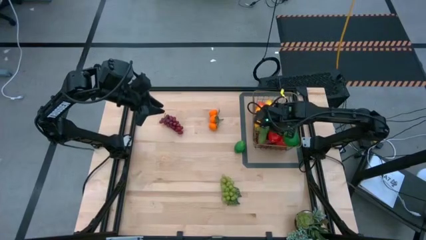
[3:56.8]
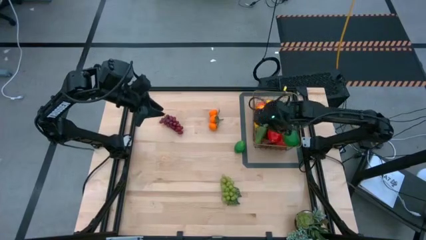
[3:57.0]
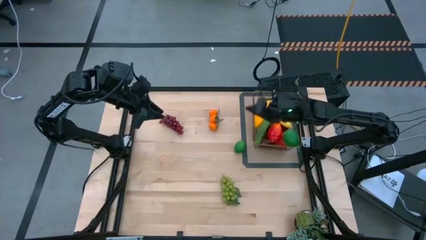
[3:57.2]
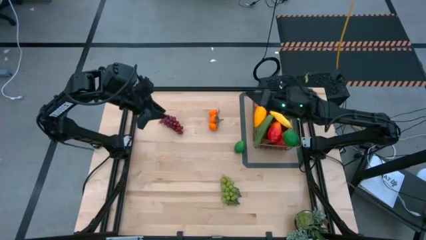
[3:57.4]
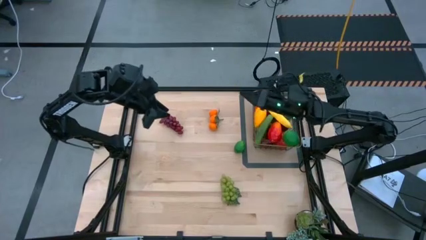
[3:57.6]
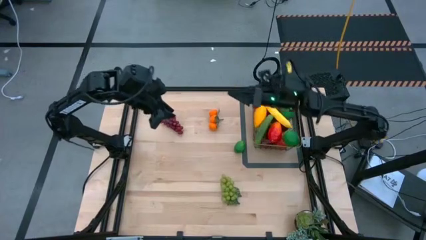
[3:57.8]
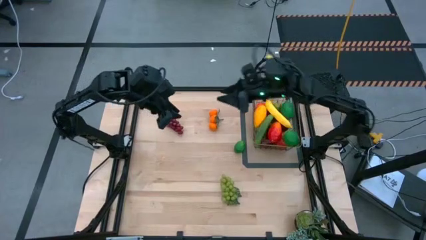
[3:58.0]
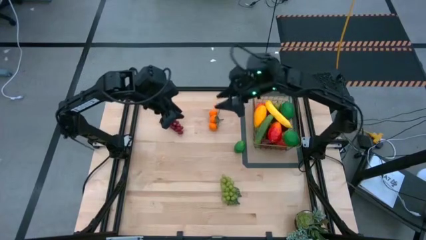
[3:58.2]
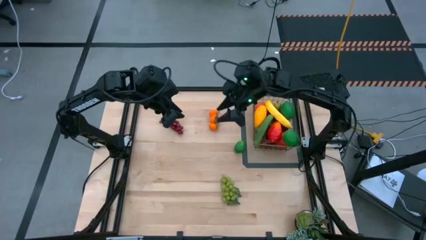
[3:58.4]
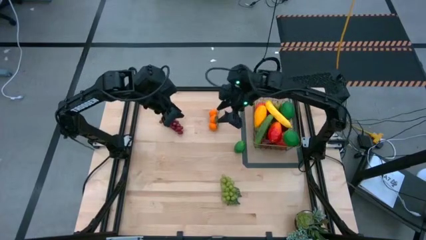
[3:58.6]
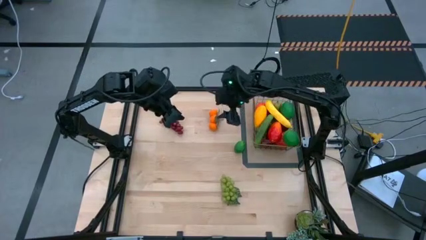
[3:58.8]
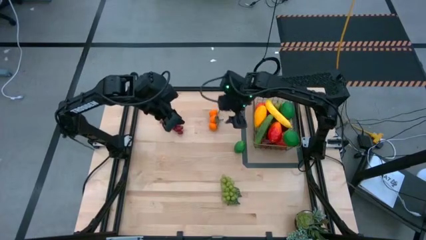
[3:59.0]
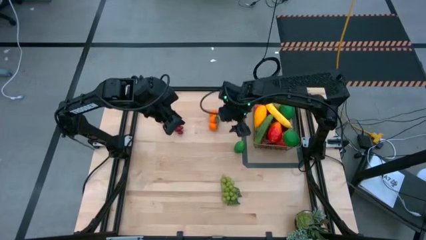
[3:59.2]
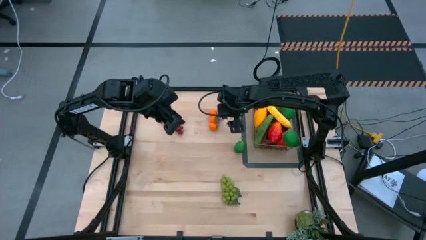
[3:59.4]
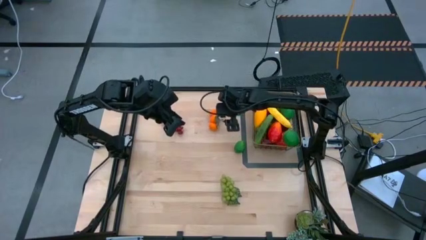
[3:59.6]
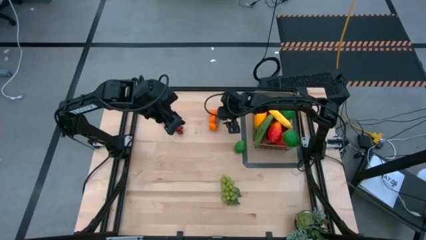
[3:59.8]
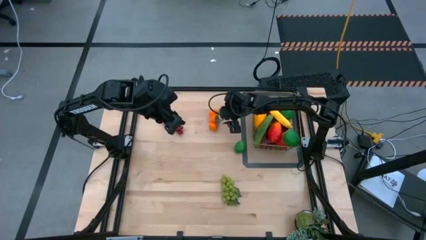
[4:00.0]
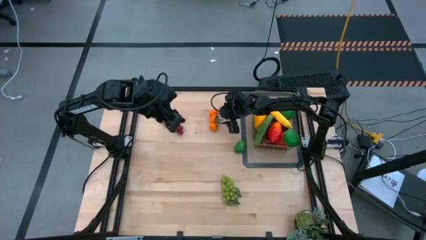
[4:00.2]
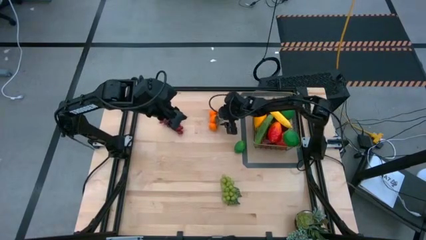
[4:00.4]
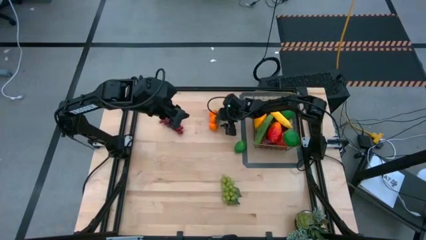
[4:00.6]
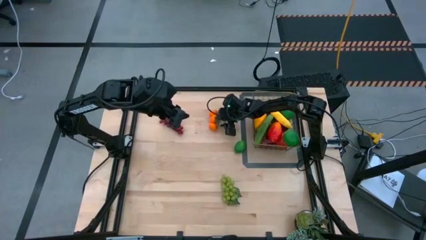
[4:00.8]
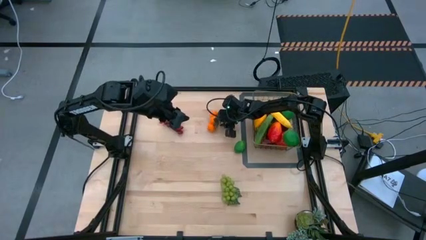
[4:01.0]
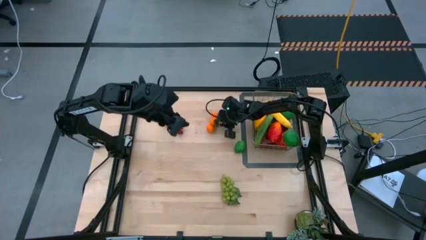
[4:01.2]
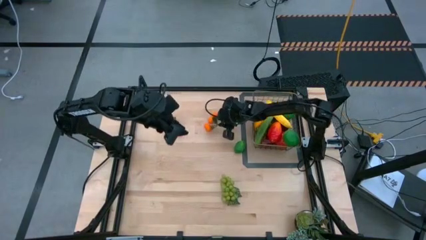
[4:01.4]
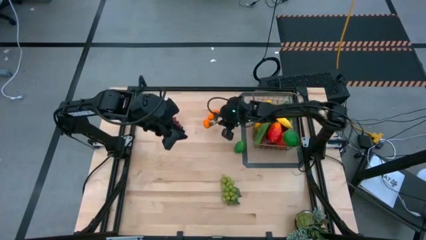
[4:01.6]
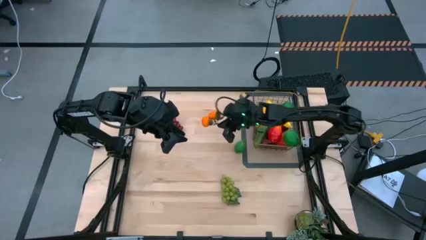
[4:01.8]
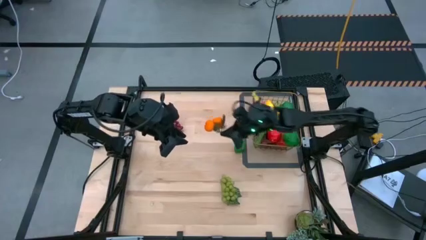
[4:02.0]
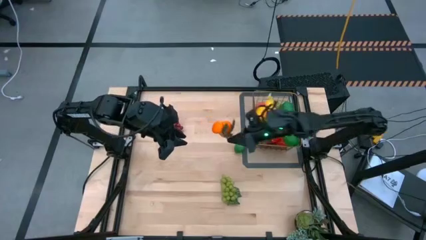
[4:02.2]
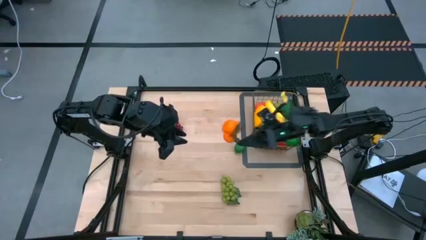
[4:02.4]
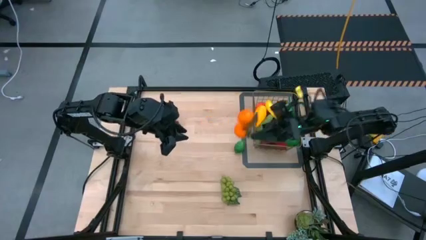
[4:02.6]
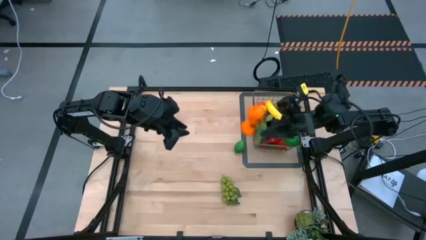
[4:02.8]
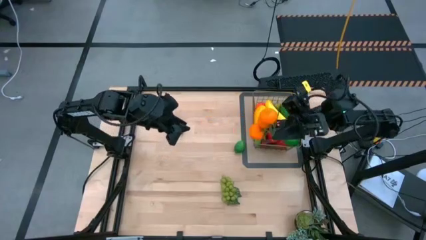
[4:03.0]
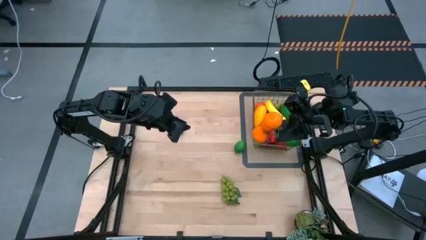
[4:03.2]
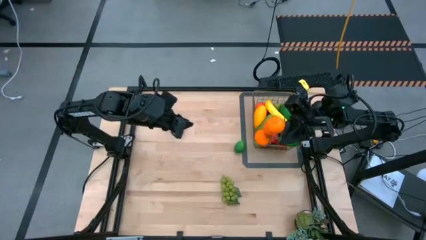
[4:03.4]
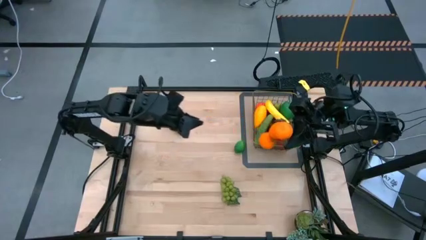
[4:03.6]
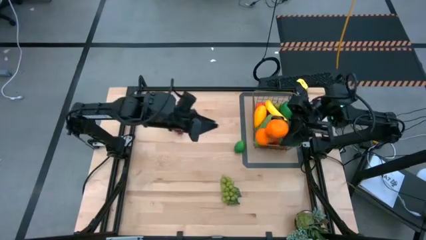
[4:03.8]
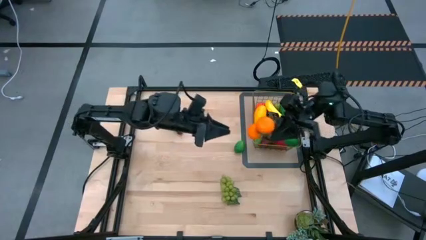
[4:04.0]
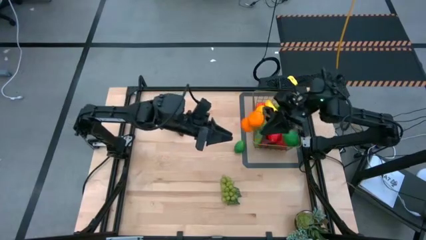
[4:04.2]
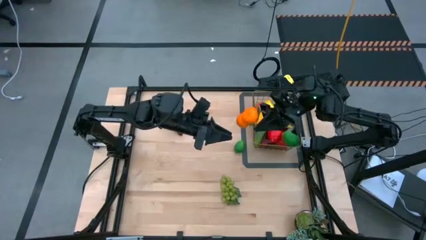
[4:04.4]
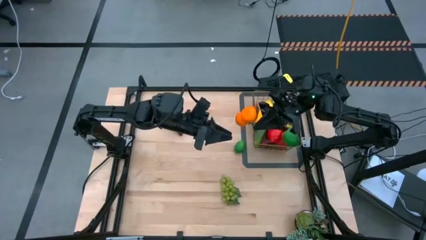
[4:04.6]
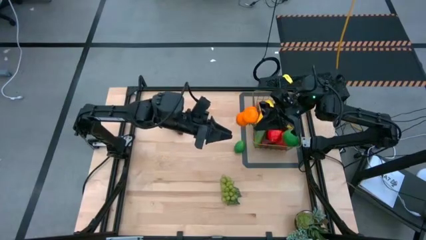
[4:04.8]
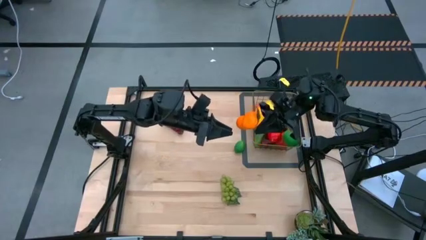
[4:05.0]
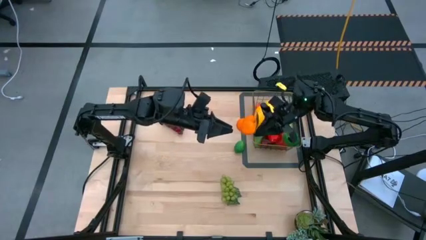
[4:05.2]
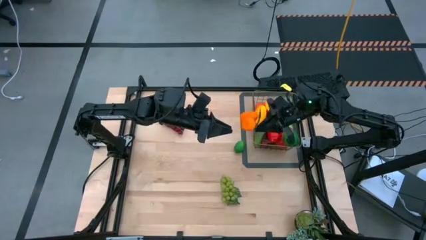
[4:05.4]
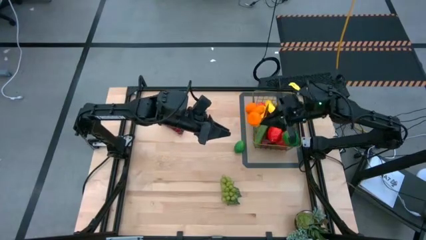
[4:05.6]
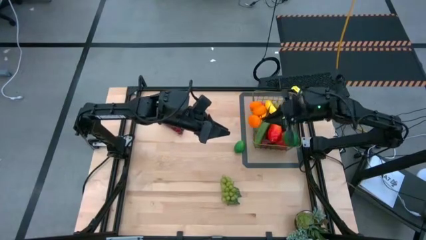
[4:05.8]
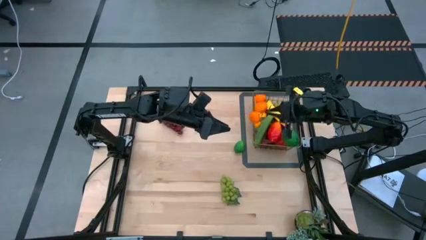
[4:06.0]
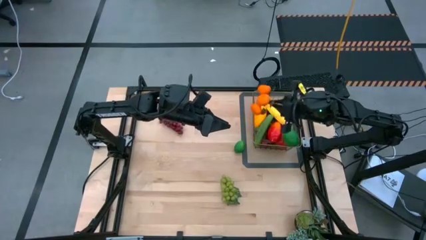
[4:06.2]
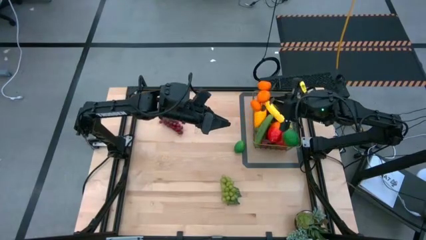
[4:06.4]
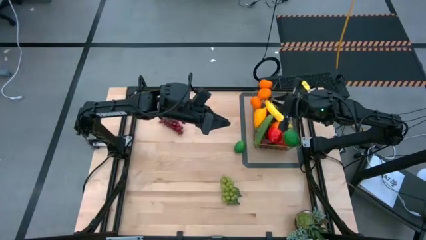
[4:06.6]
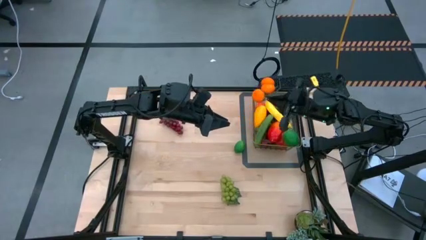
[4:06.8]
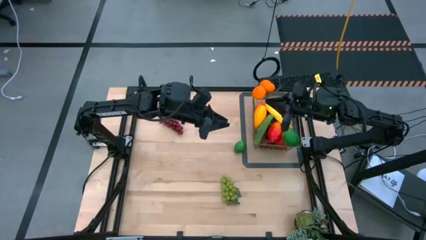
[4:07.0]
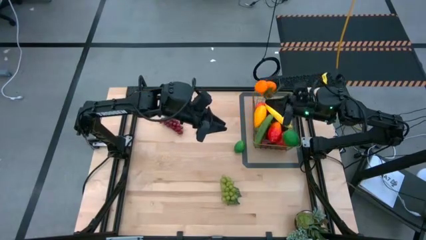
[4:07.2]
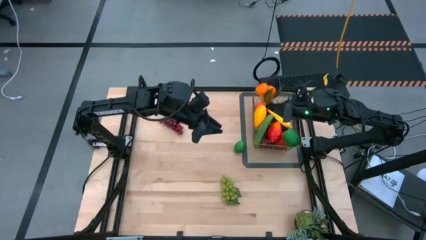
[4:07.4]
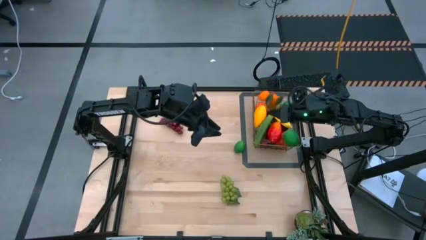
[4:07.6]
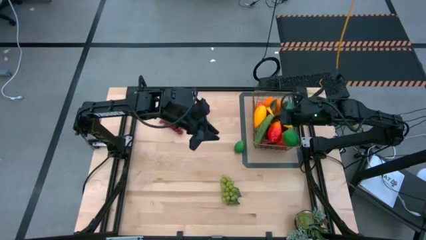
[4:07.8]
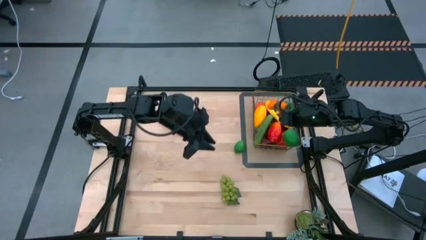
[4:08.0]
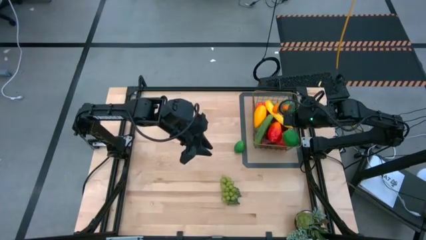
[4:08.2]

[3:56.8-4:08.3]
Task: Build produce basket
Put the tangerine into the wire basket

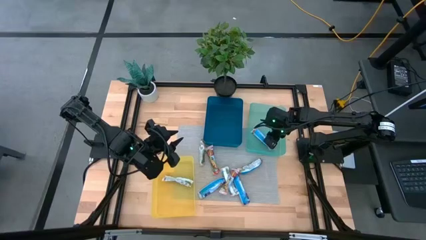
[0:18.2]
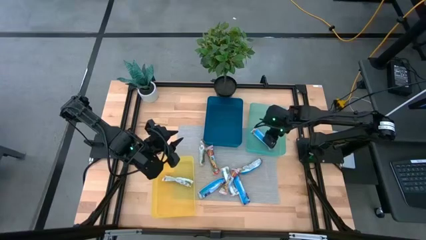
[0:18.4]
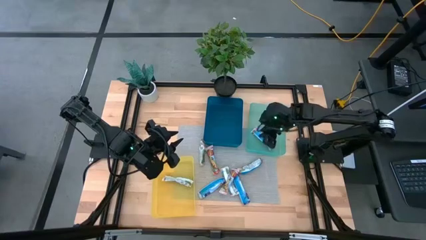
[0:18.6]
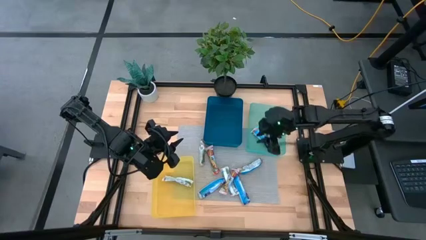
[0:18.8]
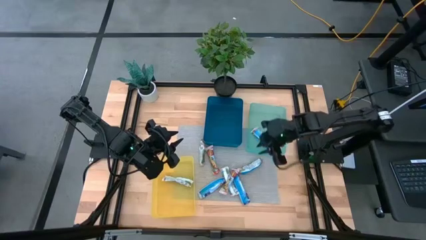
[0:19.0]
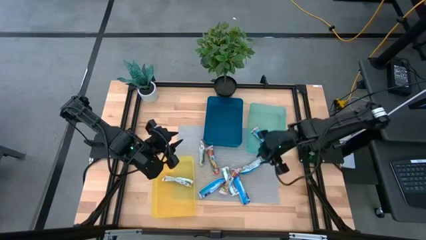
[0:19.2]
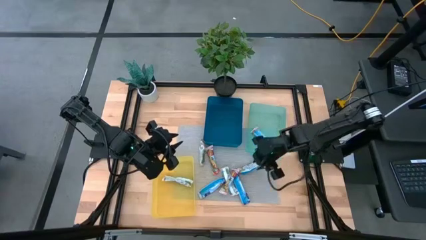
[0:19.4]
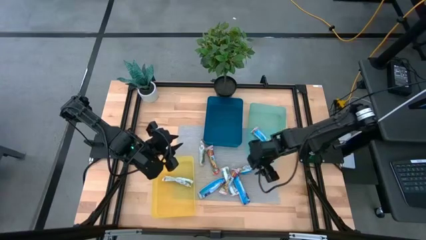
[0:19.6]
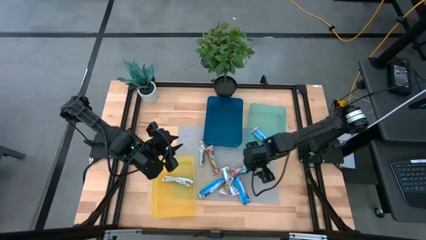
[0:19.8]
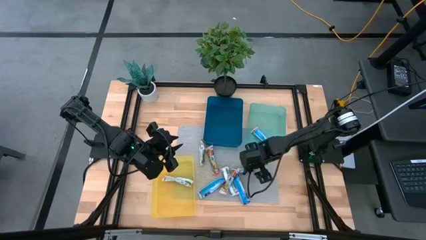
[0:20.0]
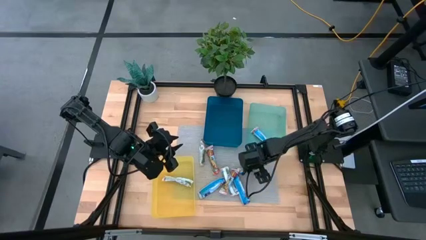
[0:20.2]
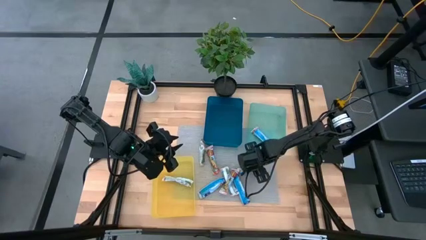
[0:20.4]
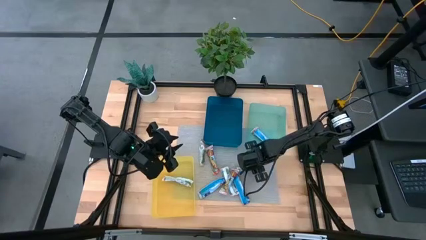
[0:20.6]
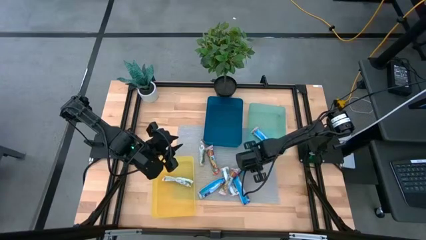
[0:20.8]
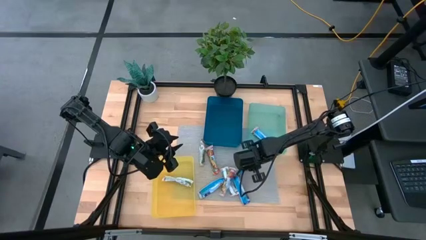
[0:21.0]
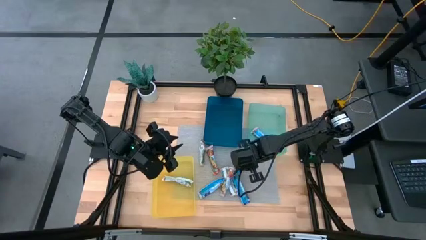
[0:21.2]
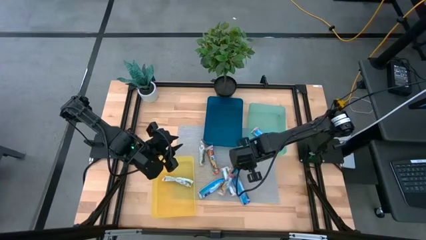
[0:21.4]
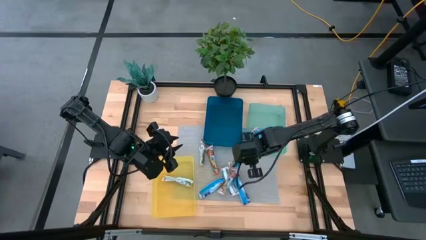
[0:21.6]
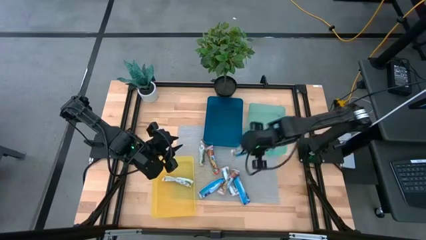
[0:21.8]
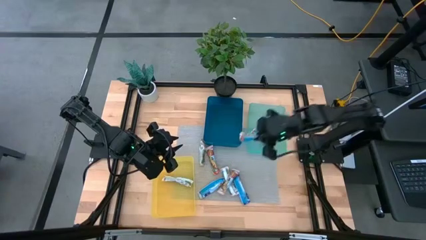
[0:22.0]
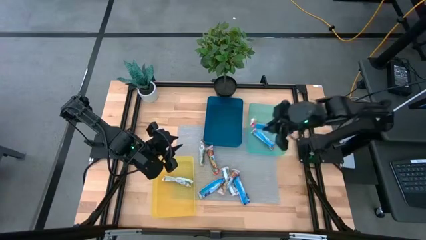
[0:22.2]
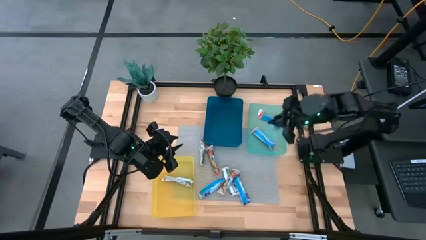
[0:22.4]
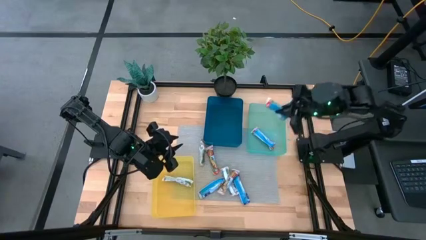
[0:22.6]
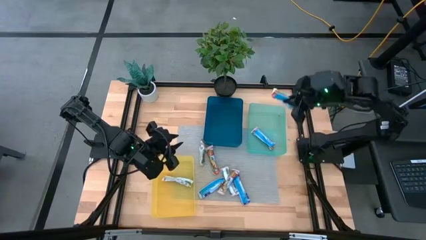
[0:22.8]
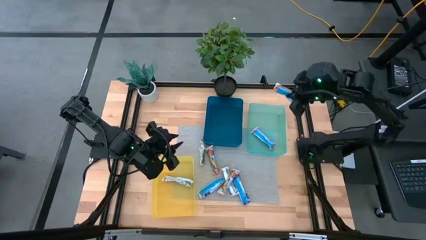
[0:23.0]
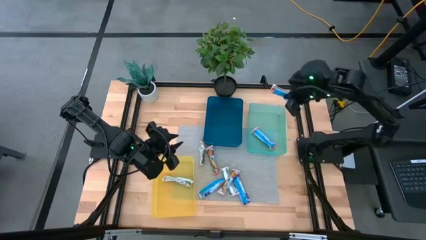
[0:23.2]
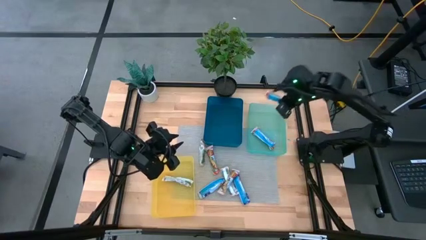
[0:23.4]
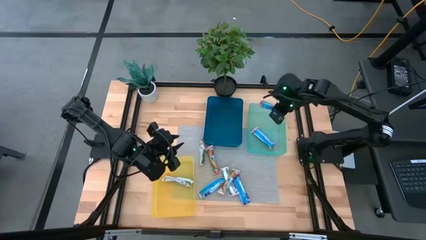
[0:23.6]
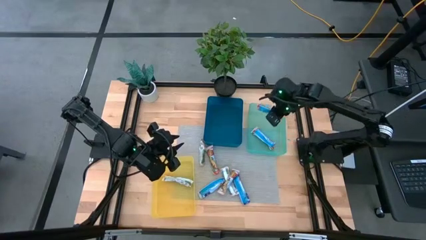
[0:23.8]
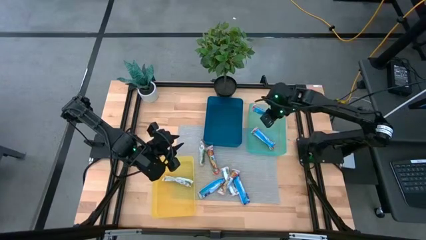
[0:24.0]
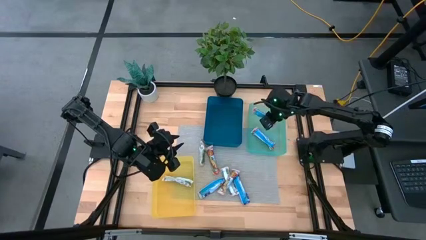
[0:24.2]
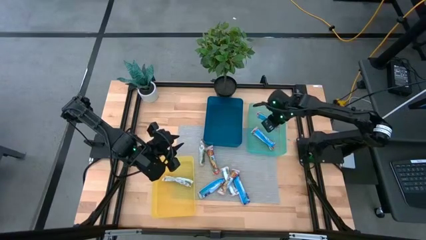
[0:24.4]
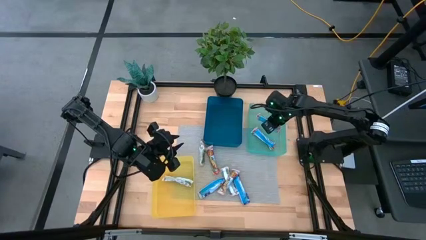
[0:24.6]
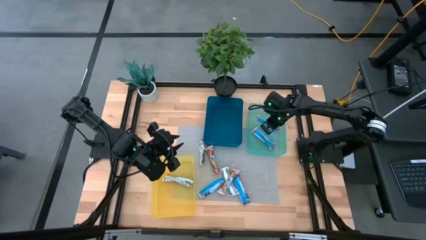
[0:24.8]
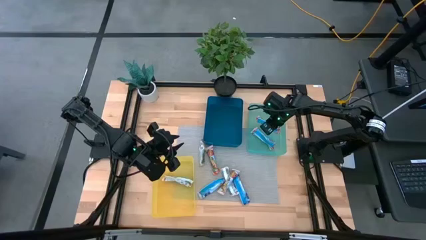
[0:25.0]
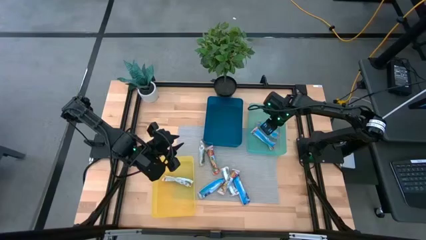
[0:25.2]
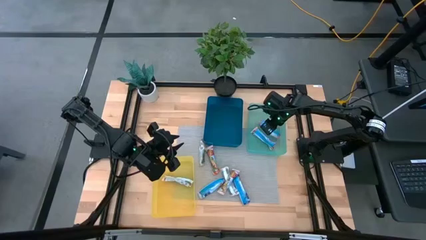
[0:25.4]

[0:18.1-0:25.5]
Task: Pick and place Granola Bars by type
Put the red granola bar into the green bin
